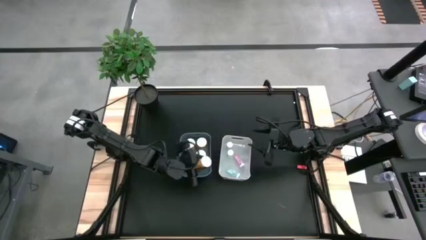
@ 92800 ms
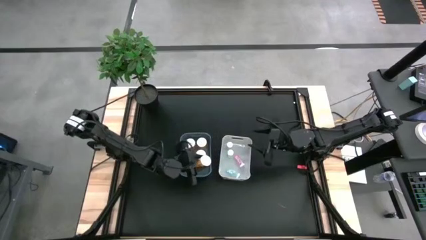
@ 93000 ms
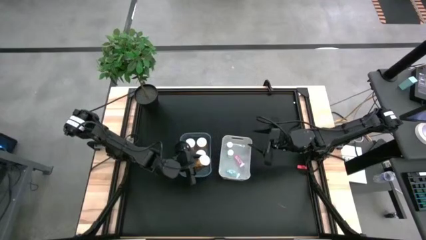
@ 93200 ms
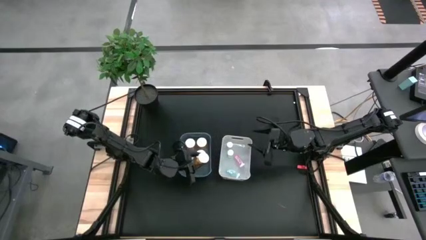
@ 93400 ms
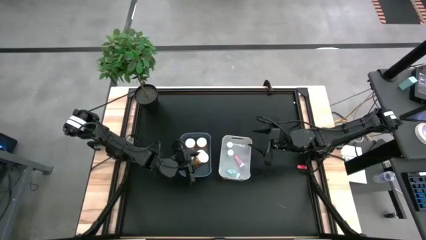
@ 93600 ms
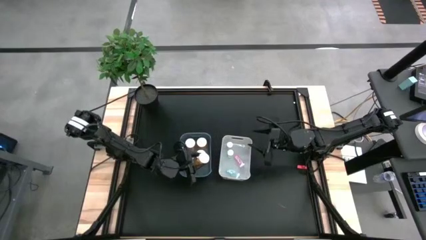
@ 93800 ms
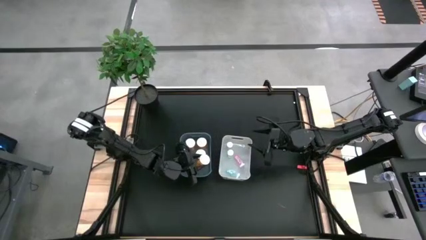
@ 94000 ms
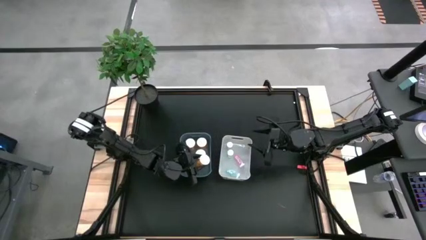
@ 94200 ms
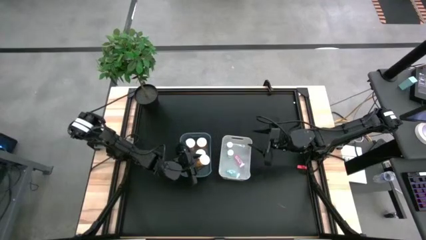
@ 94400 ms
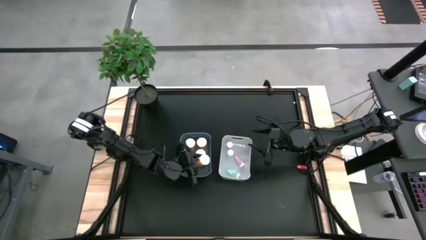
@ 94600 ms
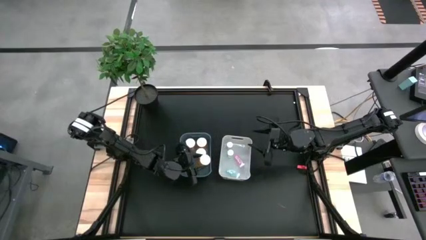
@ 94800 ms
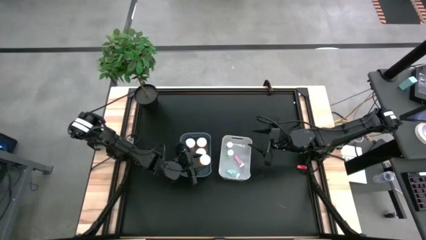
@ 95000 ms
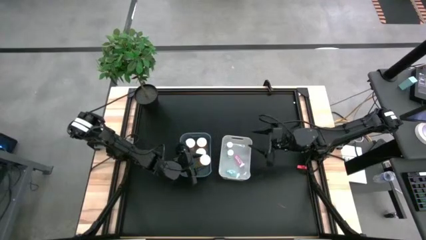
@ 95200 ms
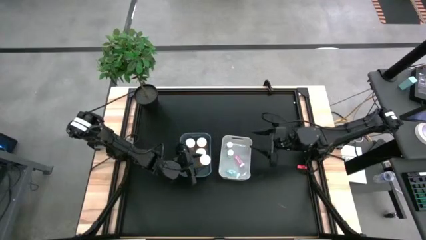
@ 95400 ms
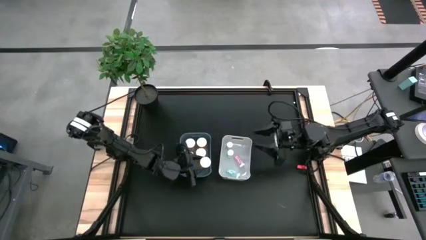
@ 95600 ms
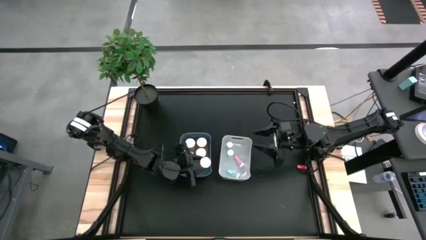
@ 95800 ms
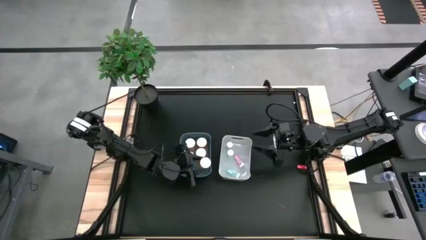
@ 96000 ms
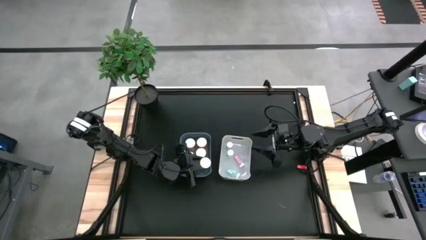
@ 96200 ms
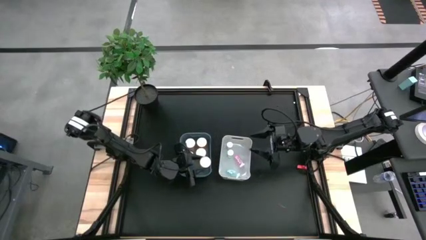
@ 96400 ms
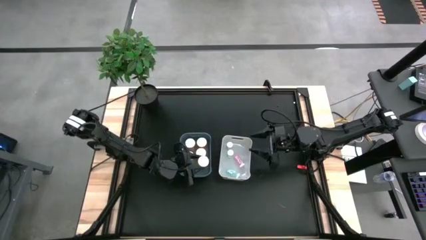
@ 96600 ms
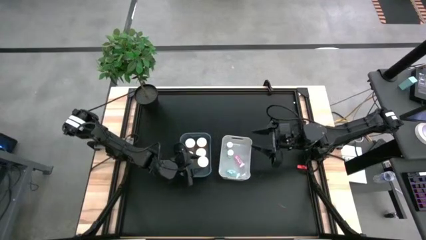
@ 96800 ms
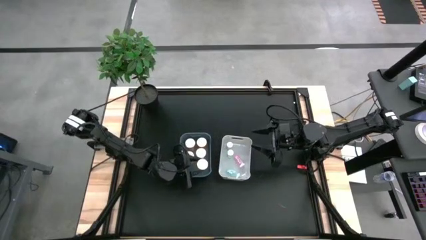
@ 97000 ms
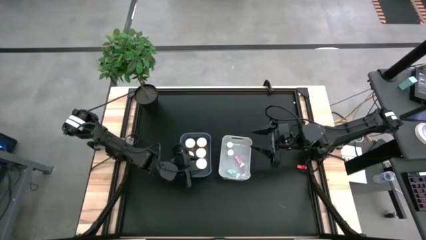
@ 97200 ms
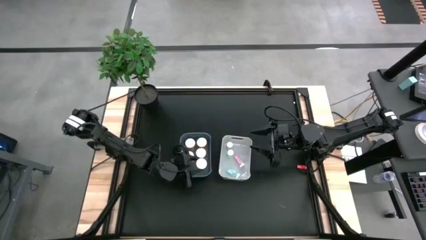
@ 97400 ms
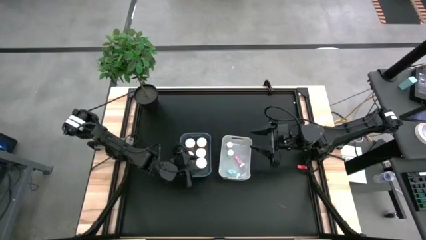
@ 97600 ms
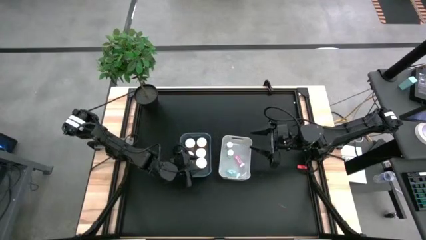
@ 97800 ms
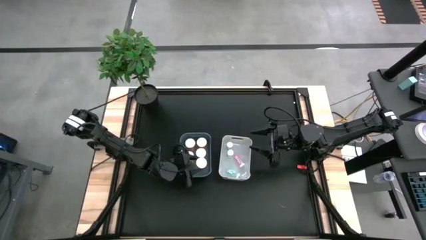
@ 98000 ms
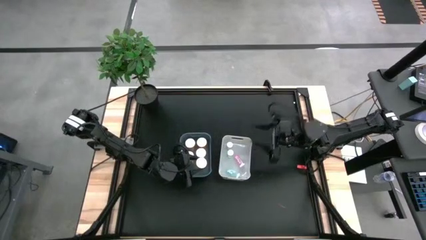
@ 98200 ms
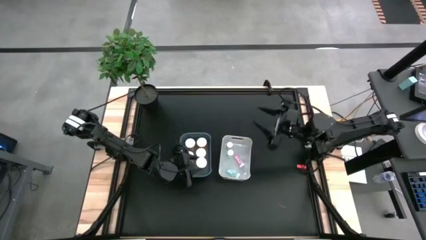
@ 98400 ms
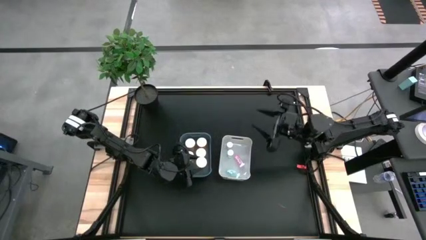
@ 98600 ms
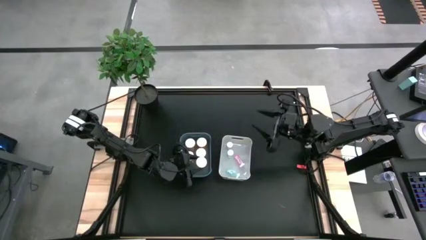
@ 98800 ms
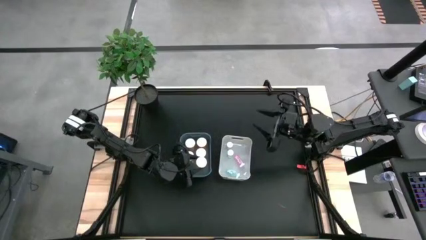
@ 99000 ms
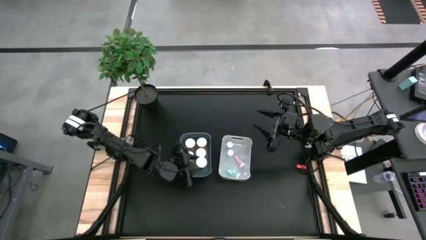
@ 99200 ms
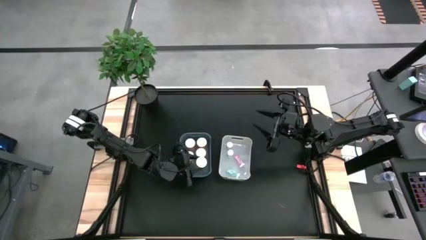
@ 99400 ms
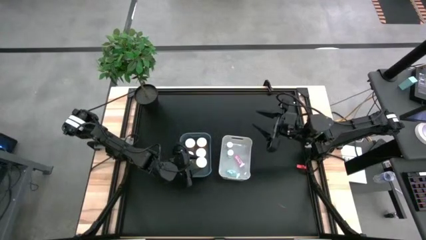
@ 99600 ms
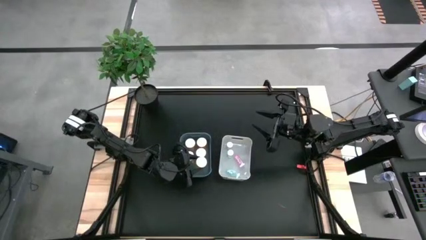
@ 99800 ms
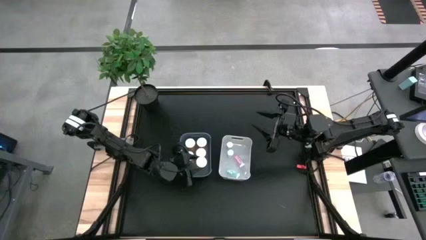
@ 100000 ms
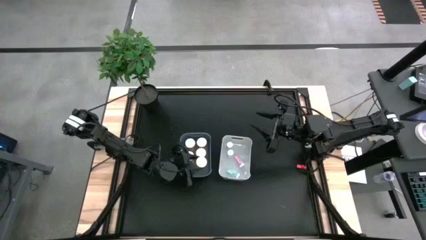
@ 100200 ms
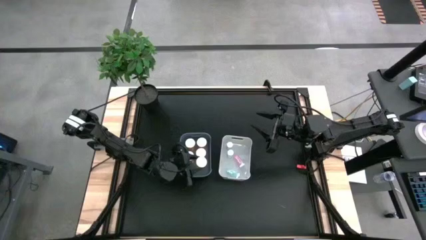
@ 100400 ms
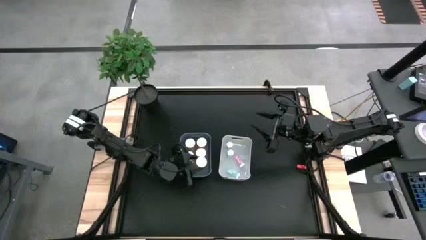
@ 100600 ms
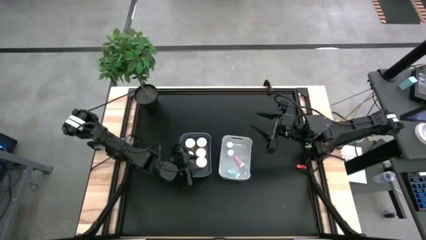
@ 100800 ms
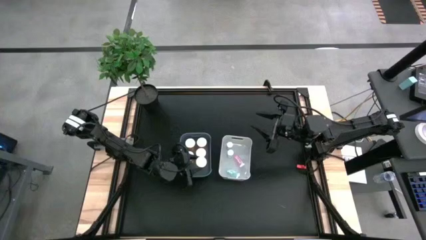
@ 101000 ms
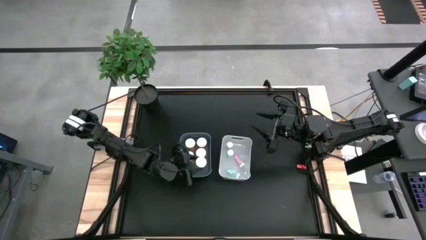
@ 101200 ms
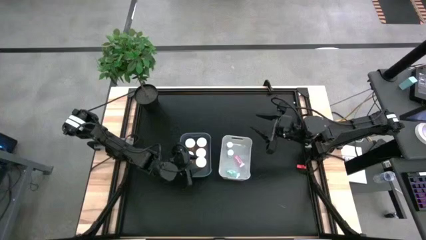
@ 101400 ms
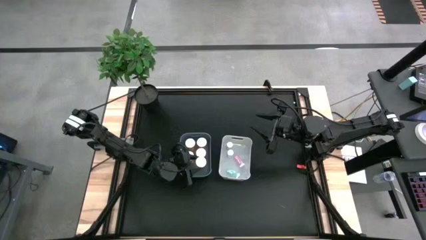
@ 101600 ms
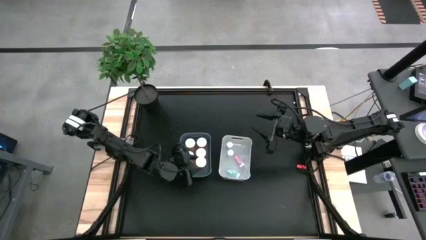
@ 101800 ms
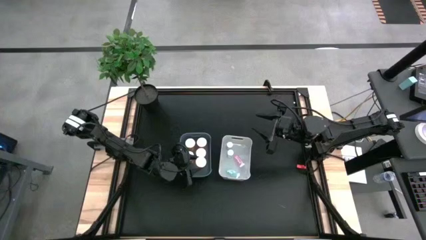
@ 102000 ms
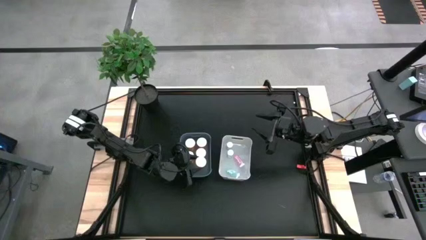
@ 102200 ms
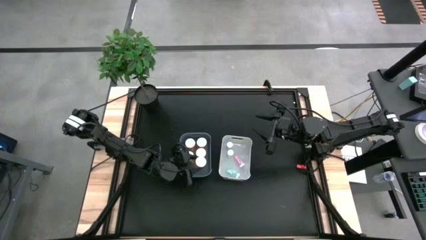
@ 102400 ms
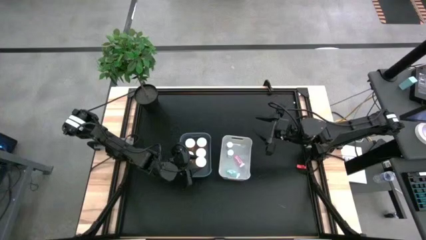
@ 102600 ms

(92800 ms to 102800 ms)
Task: Pick and place medicine bottles into bin by pill shape (circle, oval)
Put the orange capsule bottle into the blue bin

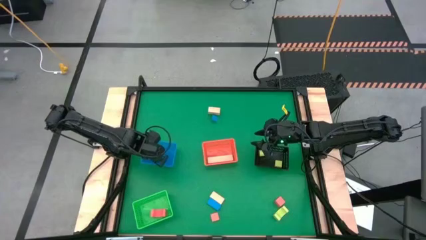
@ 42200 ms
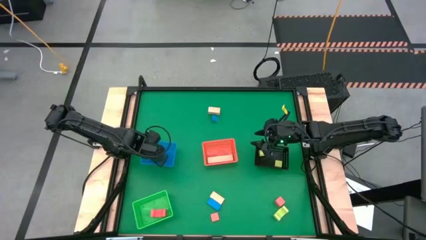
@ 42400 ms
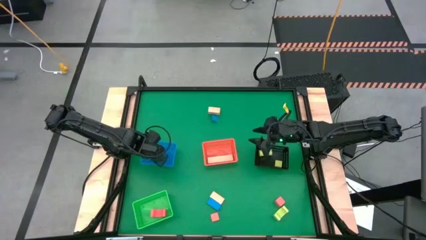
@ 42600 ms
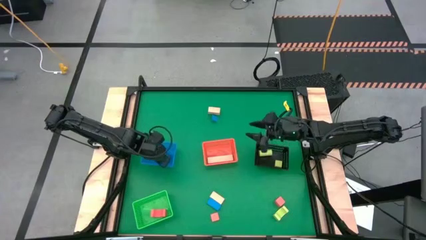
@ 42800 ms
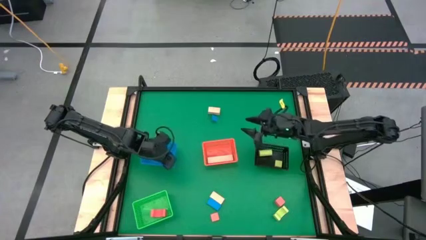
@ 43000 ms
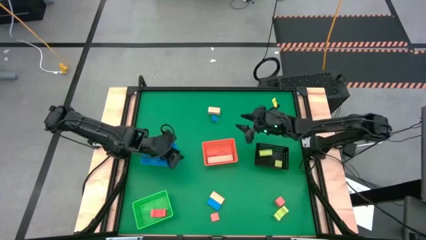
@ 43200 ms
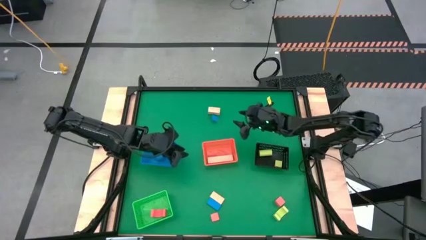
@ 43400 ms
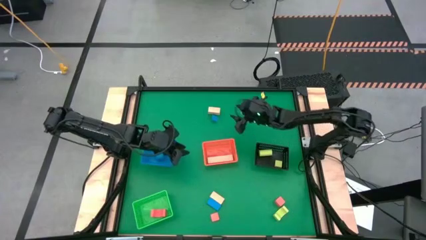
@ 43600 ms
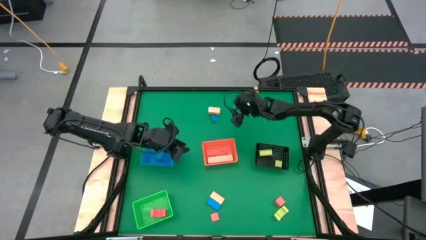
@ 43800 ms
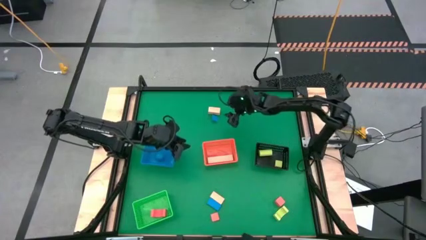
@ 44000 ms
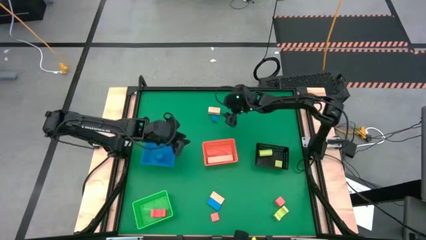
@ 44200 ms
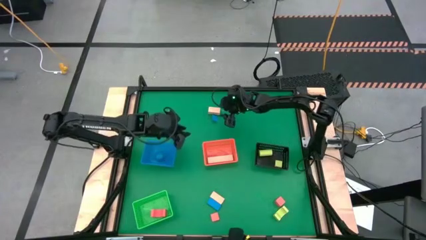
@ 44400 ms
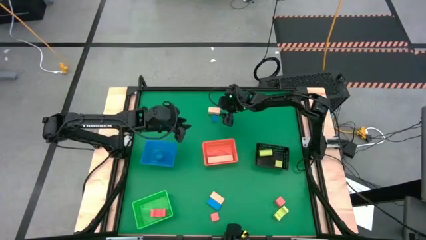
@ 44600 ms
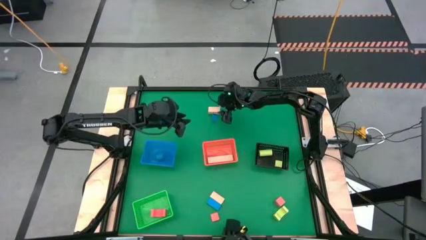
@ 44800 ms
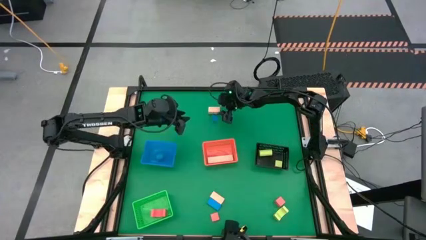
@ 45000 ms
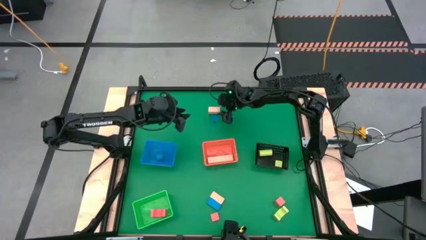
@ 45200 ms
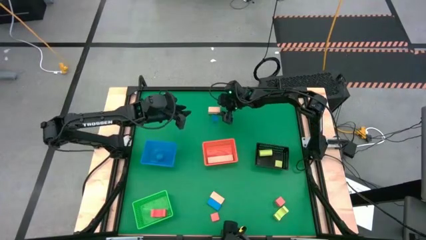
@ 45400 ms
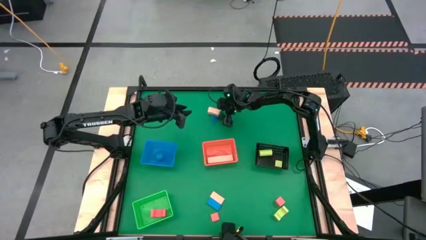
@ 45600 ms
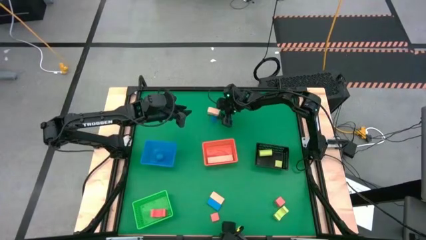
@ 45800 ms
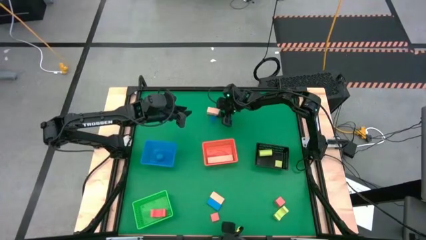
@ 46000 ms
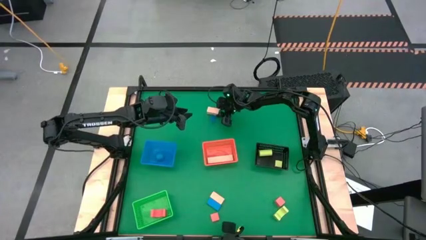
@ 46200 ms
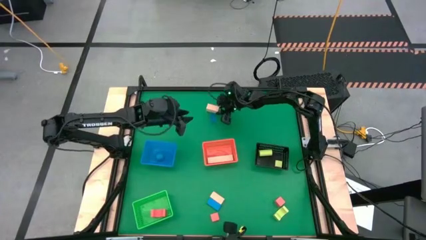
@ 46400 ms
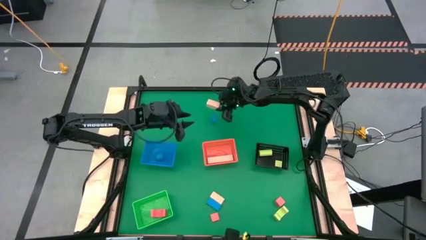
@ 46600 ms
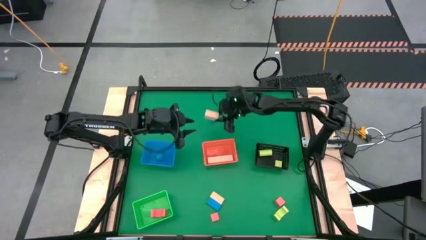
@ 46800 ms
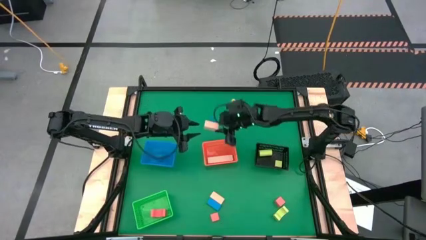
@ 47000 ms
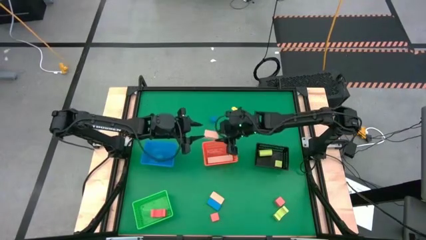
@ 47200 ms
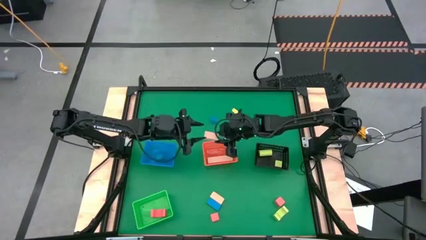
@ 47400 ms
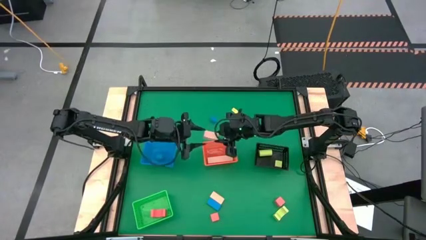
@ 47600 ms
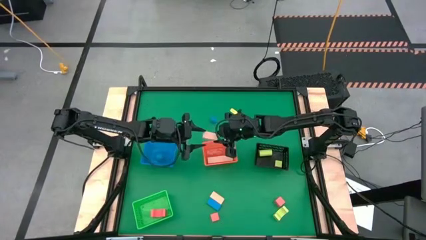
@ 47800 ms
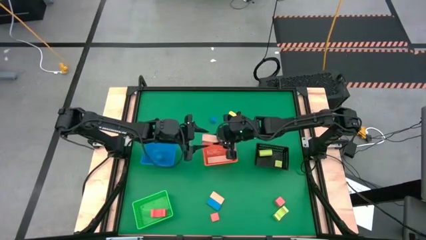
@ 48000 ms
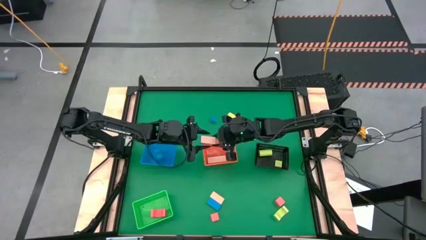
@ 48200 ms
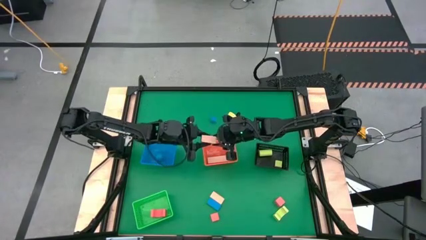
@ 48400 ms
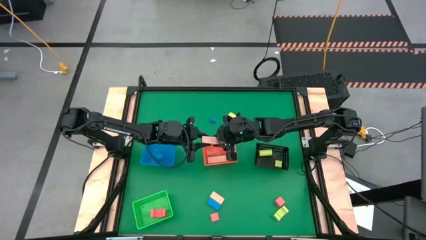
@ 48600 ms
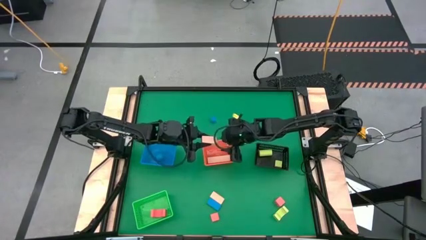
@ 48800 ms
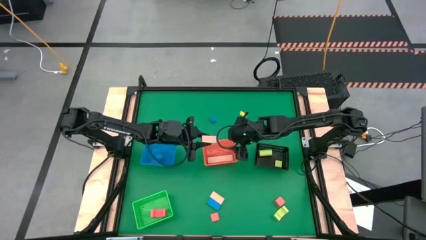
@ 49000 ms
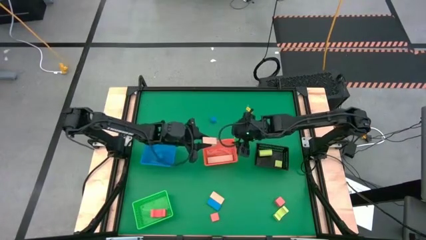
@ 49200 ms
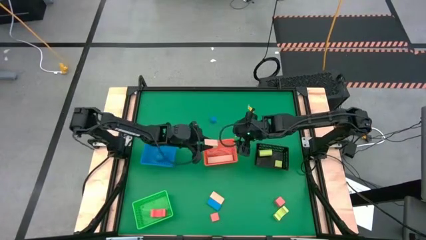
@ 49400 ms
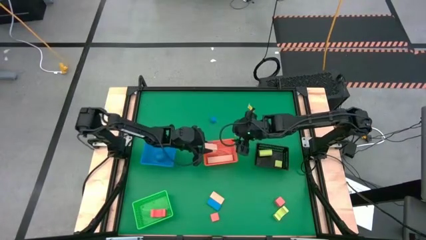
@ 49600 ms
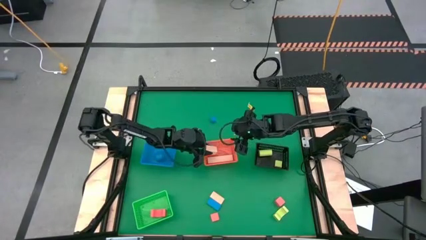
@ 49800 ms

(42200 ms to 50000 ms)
Task: Sort & place blocks by color
Put the top brown block into the orange bin
